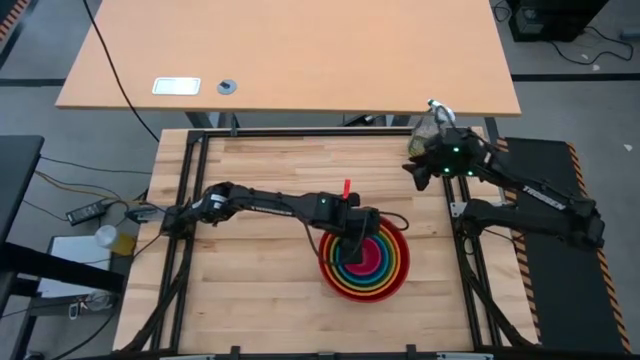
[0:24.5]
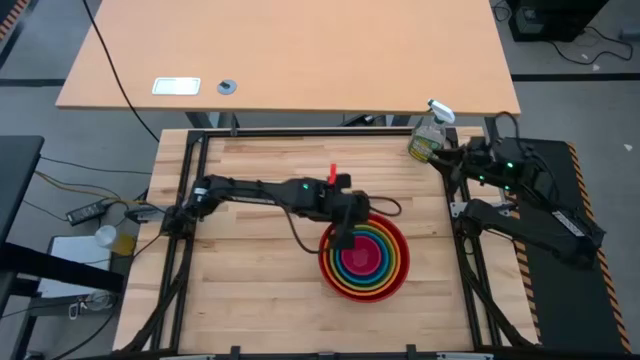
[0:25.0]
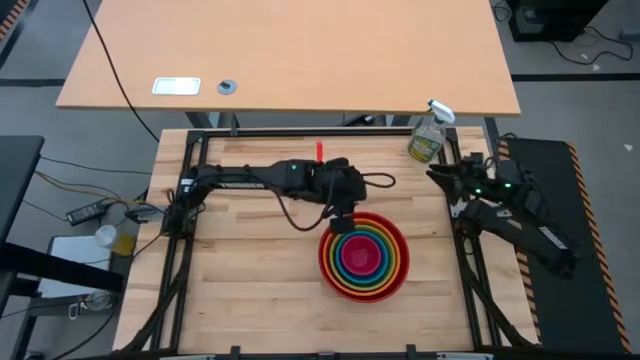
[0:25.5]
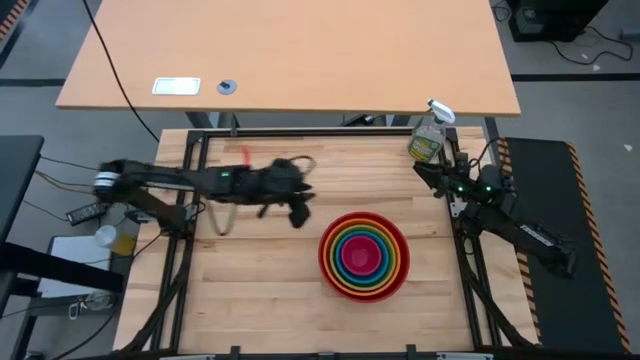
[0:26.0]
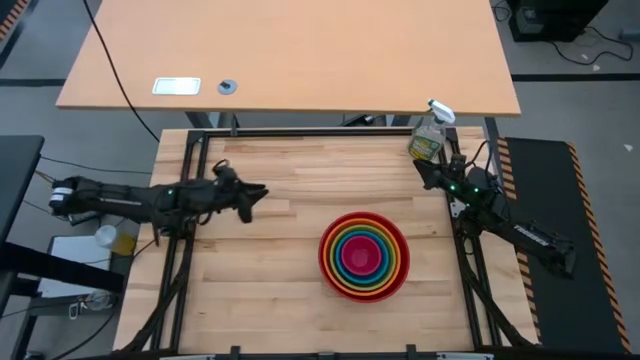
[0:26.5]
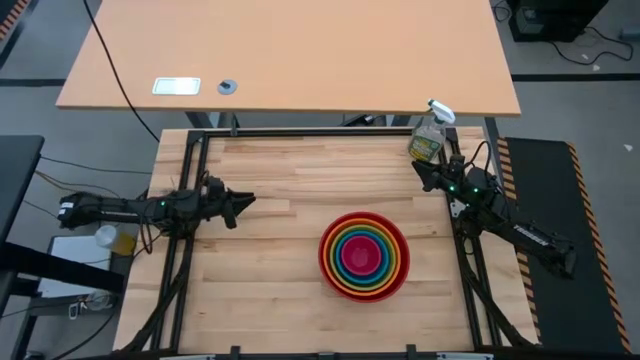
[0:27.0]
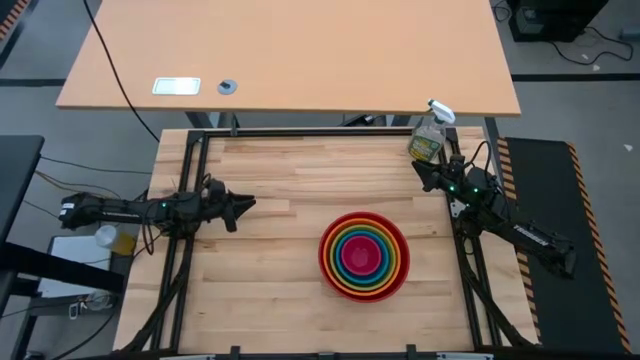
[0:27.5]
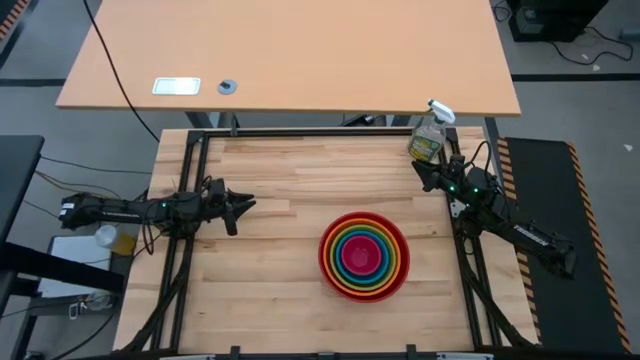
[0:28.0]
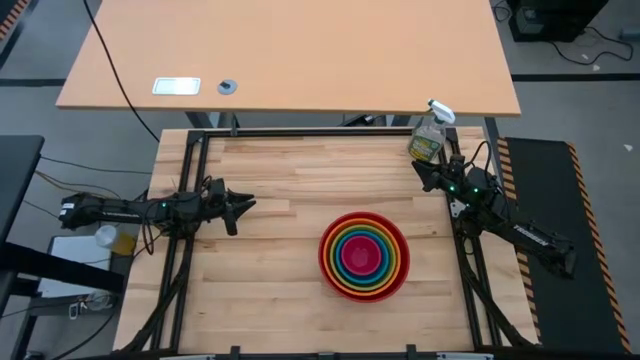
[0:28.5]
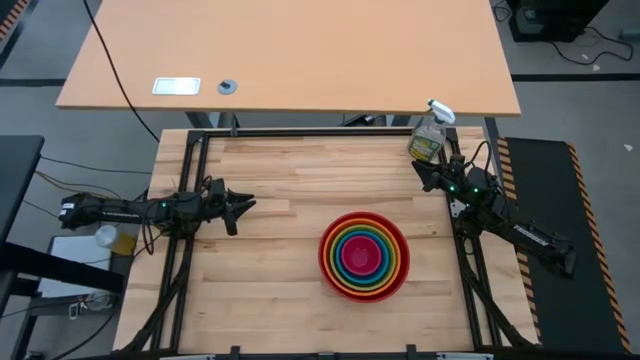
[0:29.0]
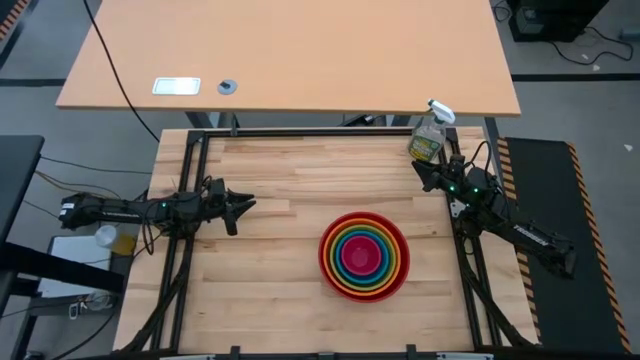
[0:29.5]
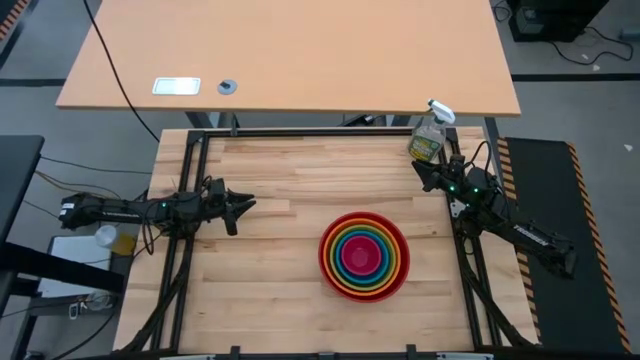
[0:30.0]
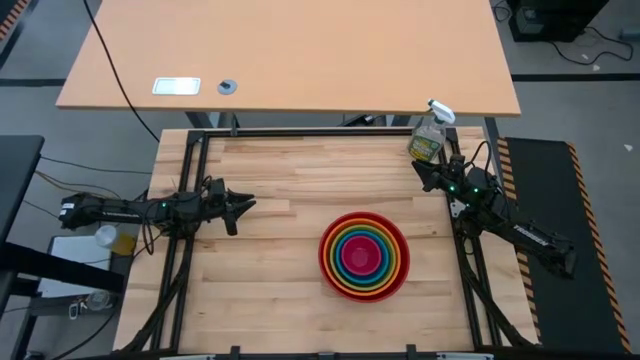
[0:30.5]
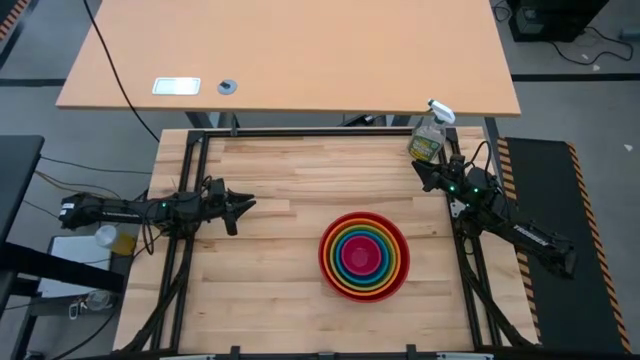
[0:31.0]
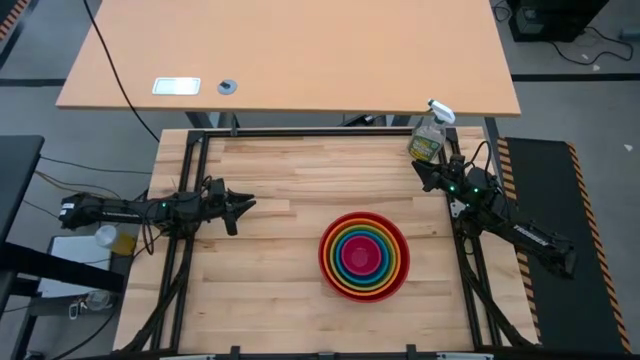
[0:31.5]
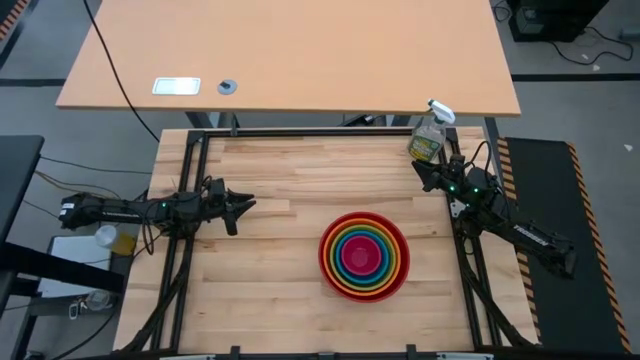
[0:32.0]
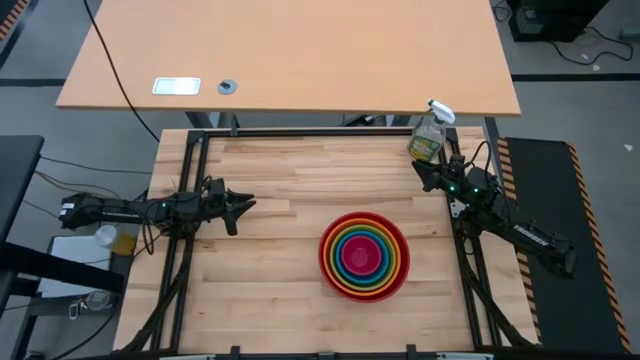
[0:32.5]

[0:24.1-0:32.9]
Return to Home Position

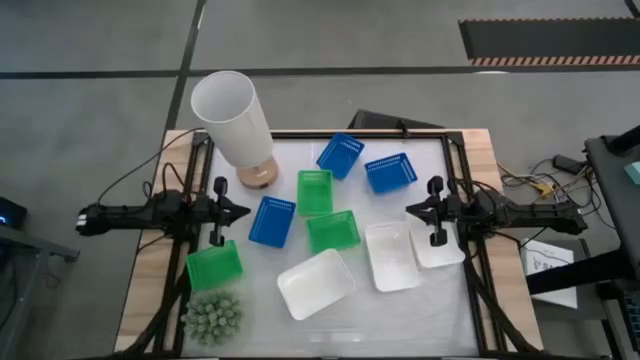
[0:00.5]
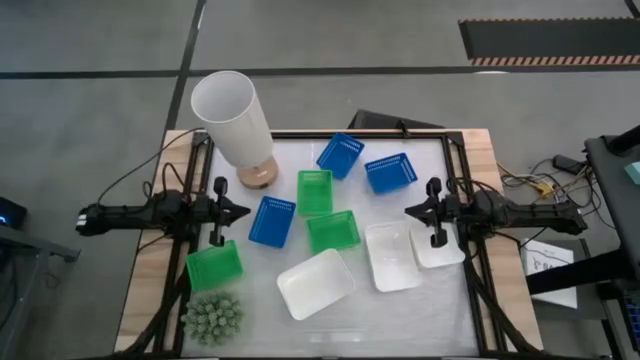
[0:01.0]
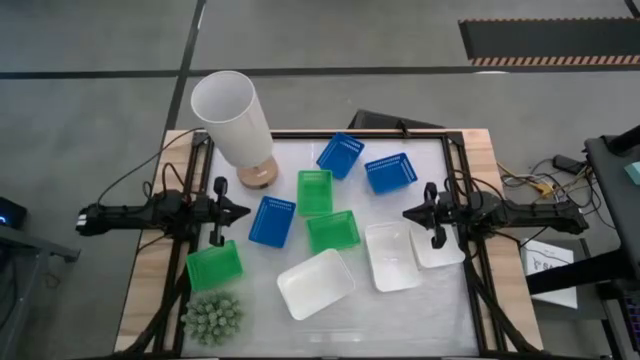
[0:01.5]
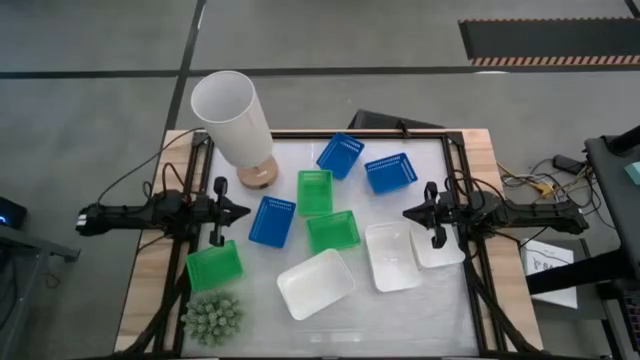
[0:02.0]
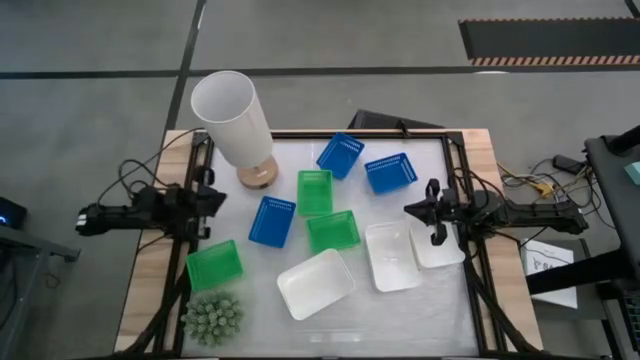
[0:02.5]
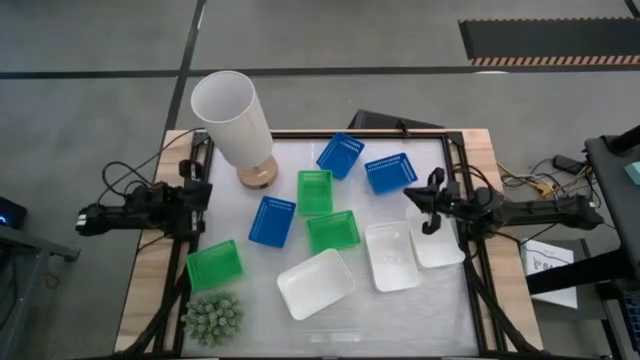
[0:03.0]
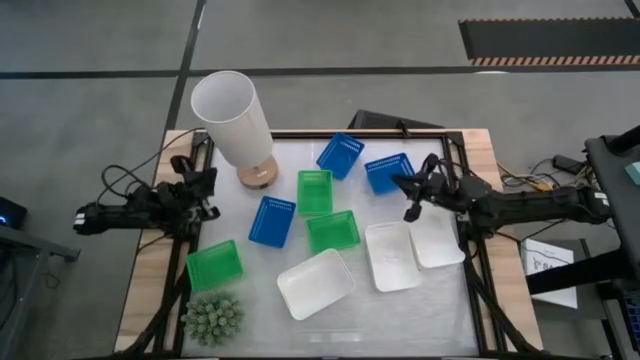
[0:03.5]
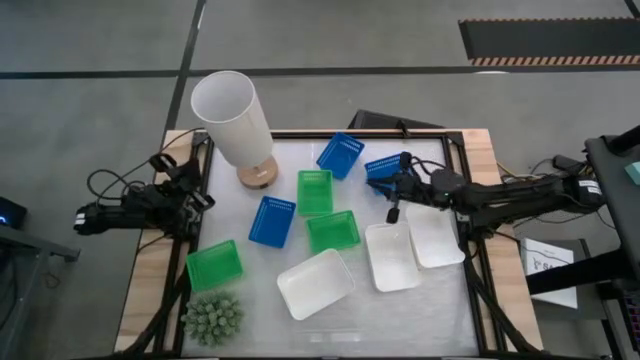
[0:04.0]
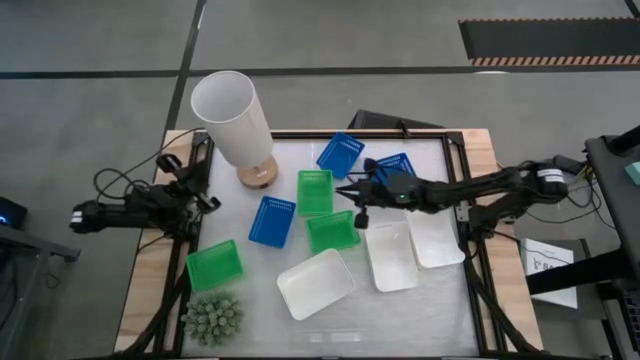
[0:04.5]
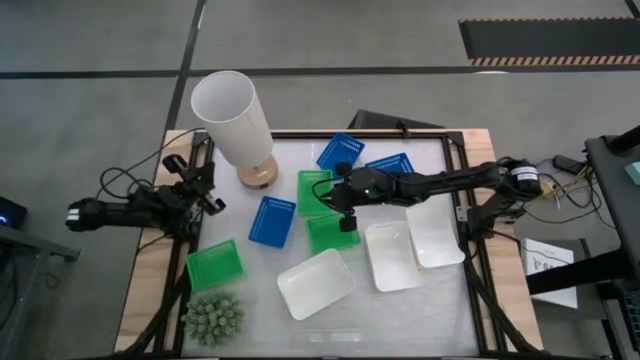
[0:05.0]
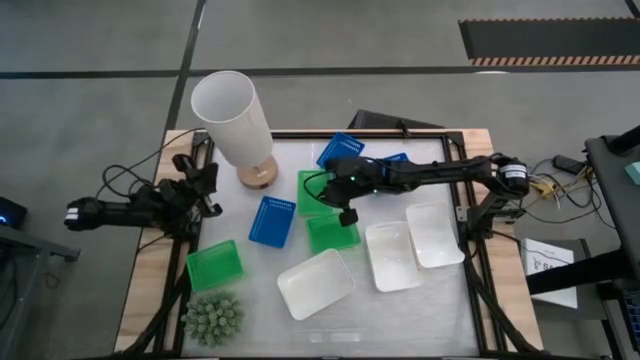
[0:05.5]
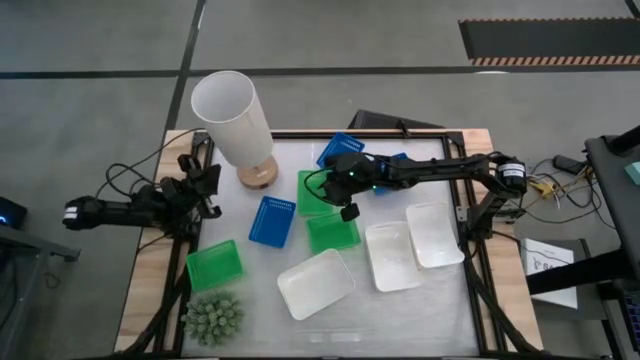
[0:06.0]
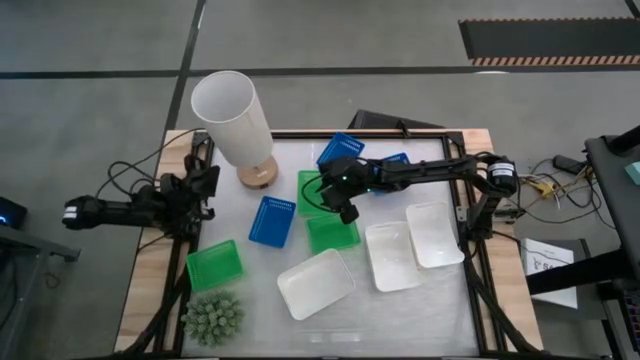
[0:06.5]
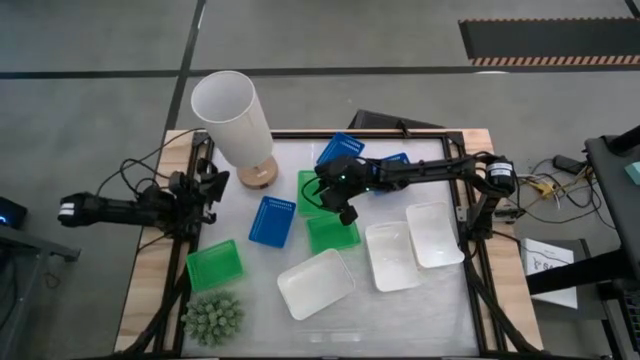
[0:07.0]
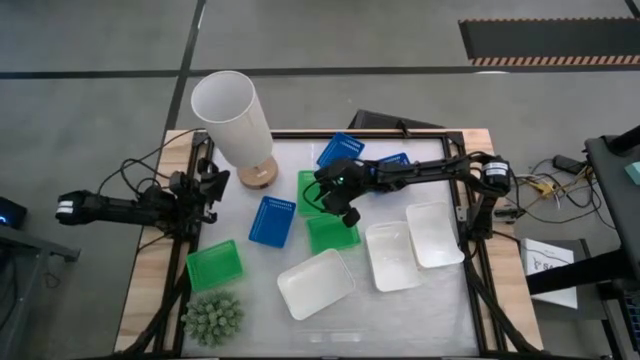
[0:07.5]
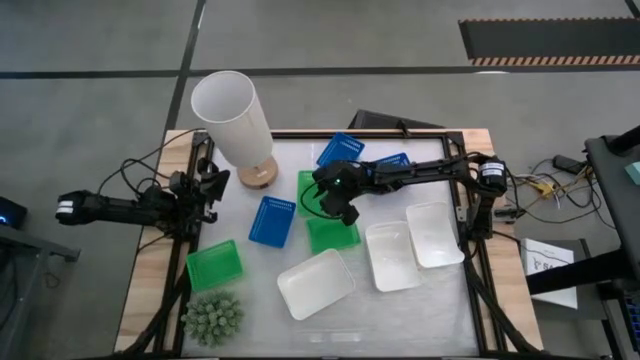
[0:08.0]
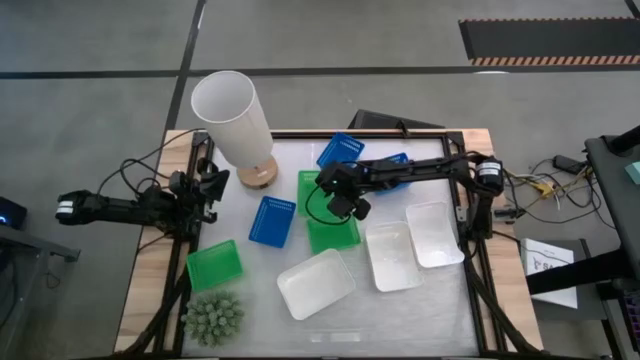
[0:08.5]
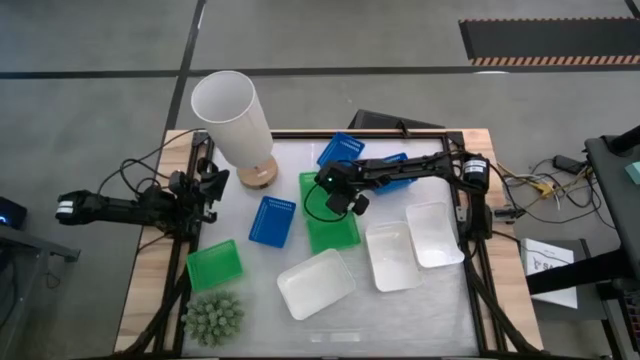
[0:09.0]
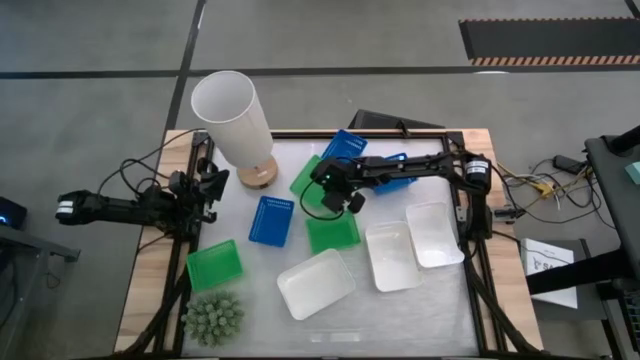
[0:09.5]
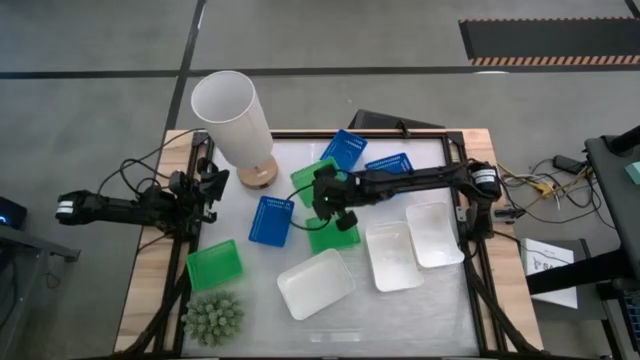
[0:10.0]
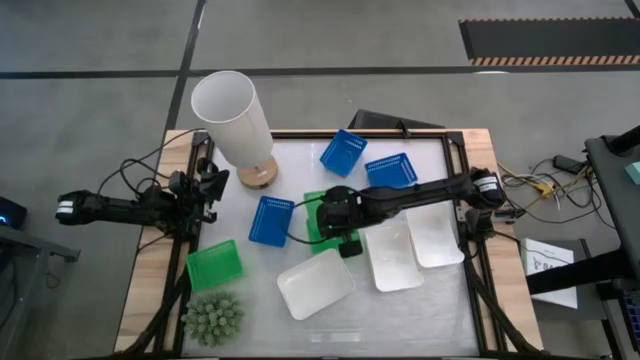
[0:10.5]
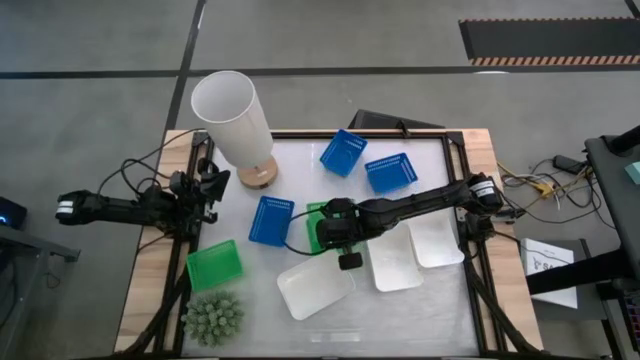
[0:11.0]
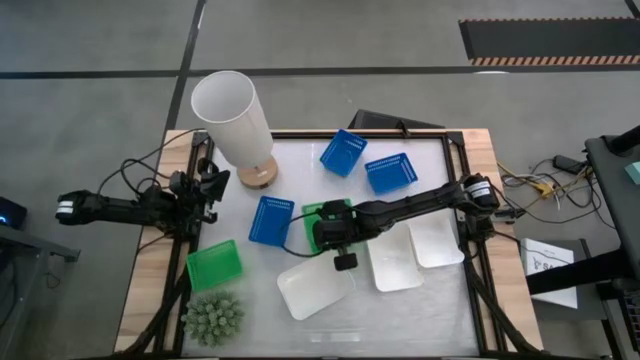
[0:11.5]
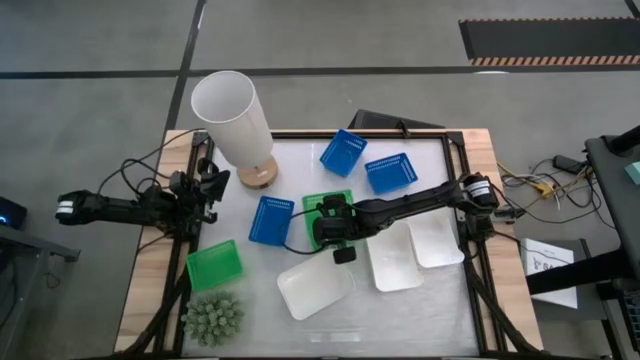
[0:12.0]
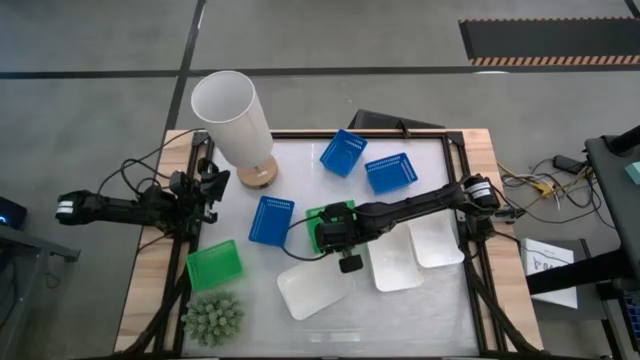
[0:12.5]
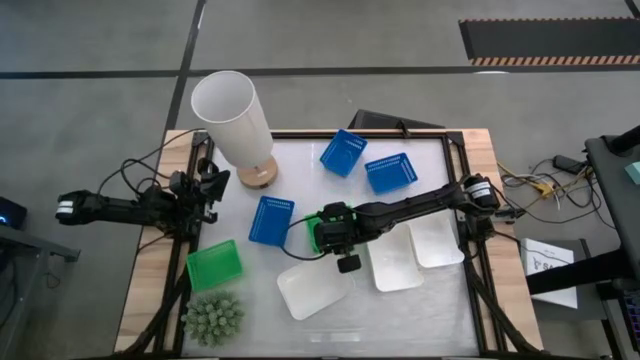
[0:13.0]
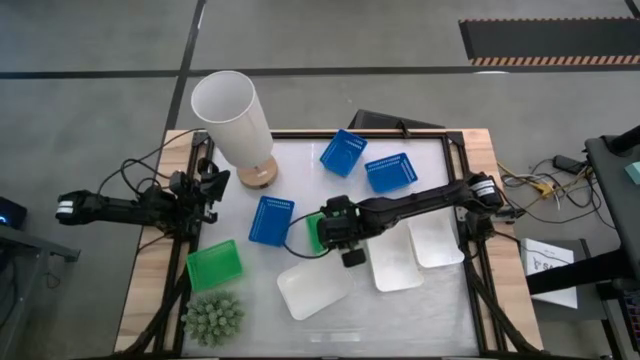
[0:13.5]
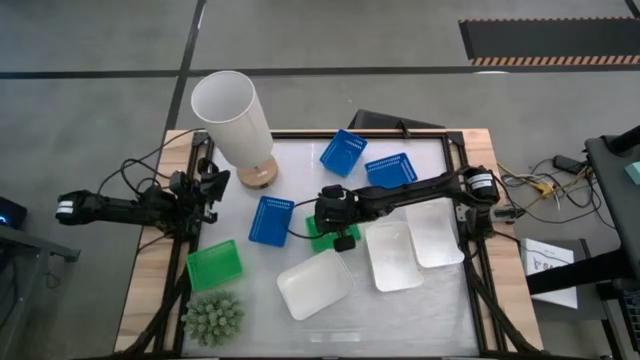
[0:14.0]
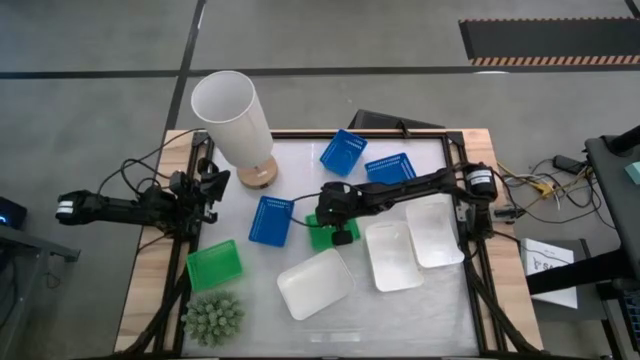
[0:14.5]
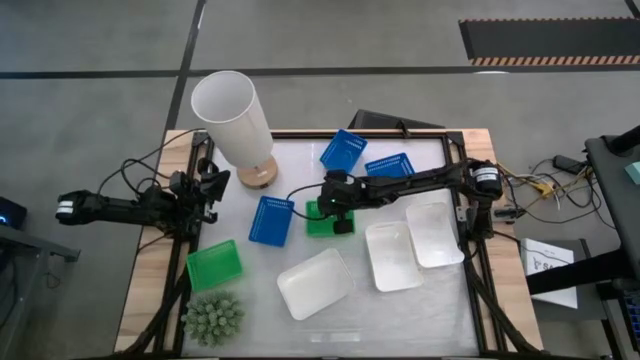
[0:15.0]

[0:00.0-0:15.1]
Stack the top green bin on top of the bottom right green bin
